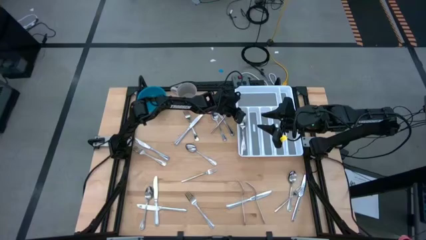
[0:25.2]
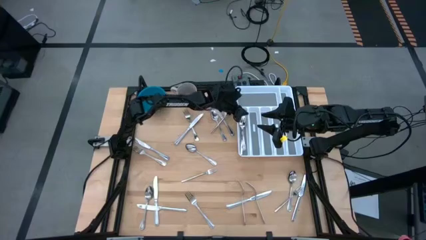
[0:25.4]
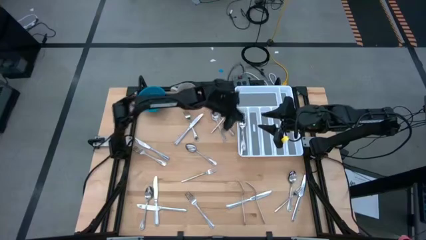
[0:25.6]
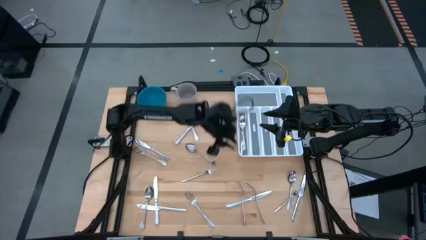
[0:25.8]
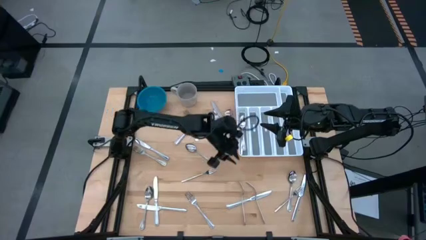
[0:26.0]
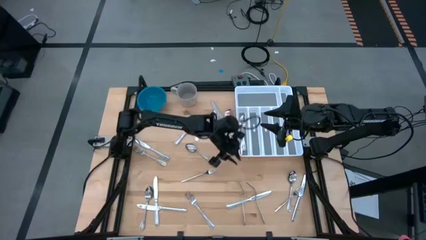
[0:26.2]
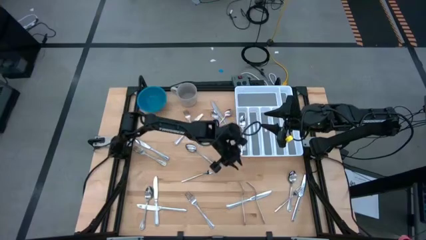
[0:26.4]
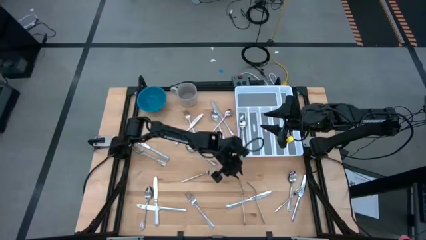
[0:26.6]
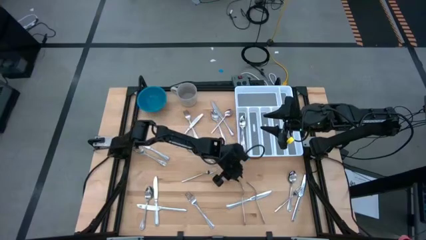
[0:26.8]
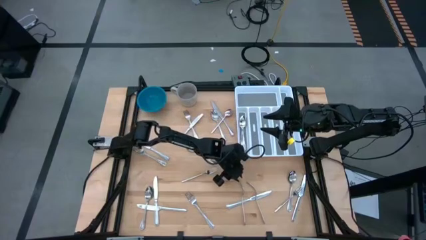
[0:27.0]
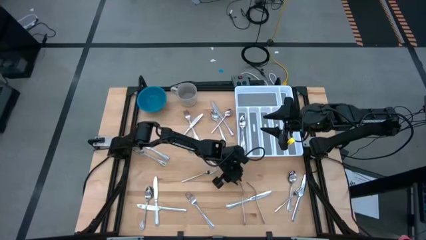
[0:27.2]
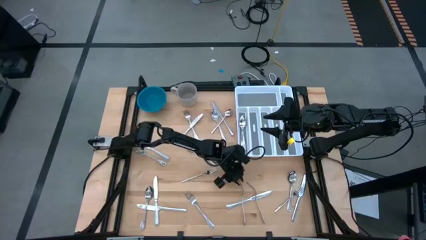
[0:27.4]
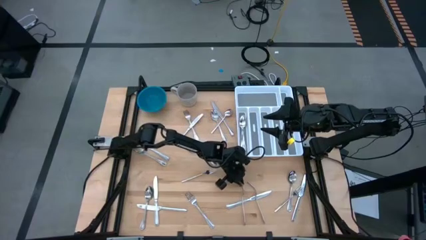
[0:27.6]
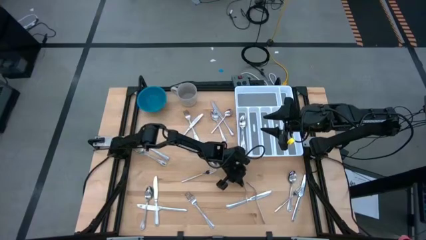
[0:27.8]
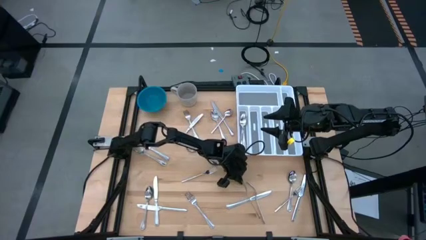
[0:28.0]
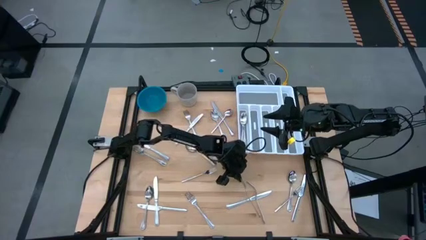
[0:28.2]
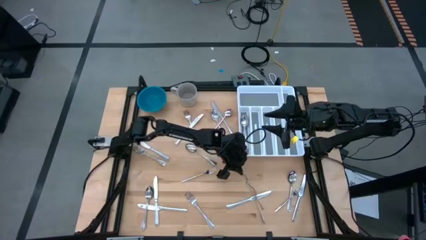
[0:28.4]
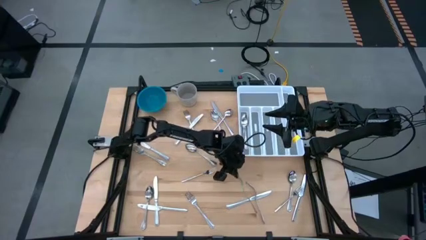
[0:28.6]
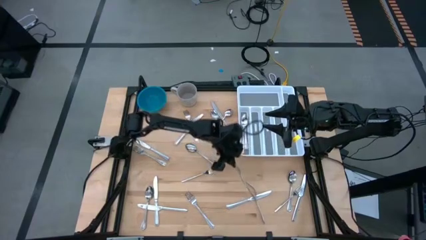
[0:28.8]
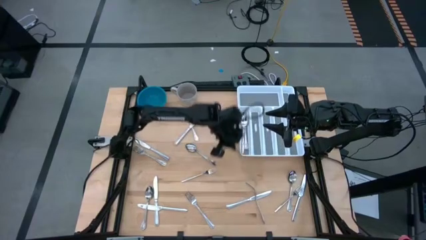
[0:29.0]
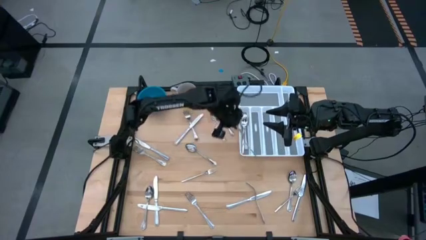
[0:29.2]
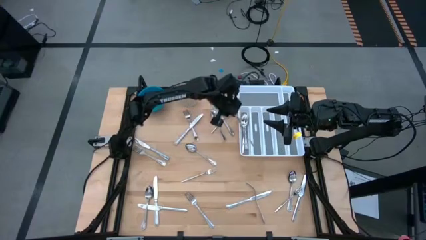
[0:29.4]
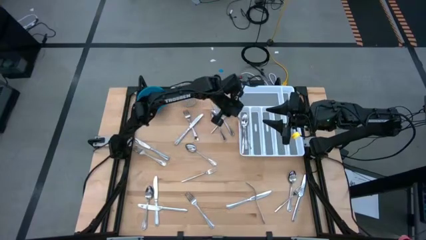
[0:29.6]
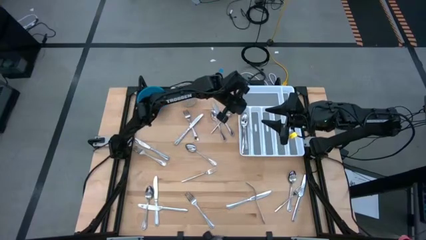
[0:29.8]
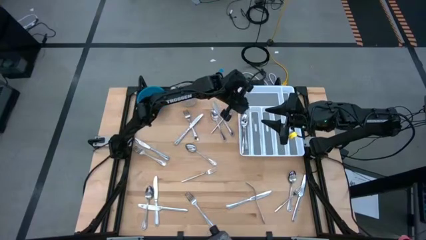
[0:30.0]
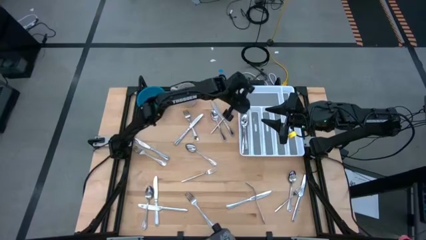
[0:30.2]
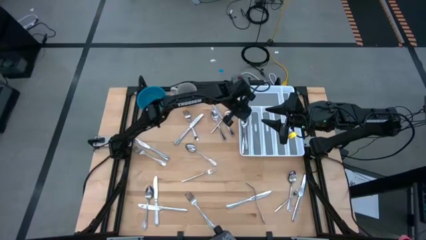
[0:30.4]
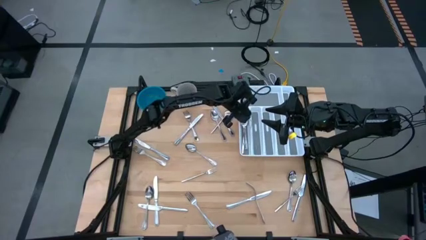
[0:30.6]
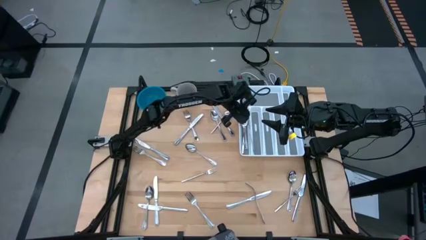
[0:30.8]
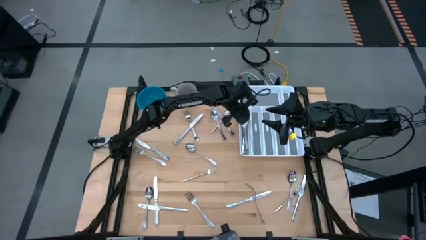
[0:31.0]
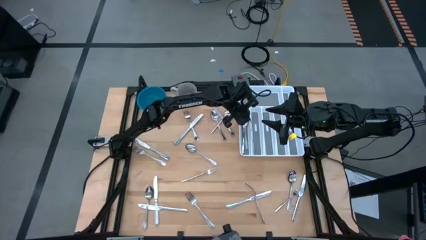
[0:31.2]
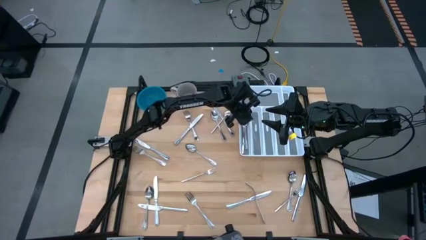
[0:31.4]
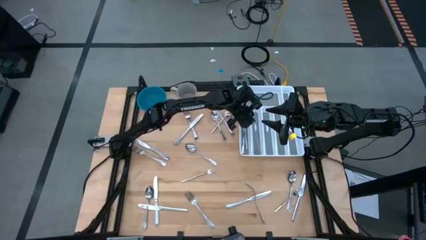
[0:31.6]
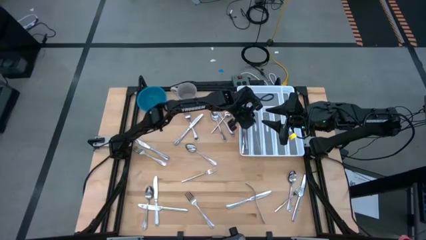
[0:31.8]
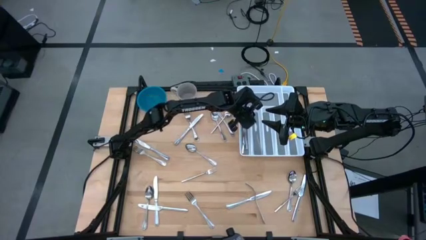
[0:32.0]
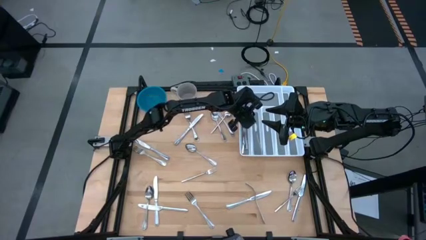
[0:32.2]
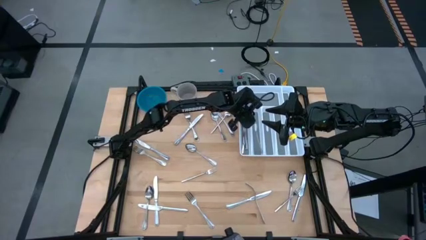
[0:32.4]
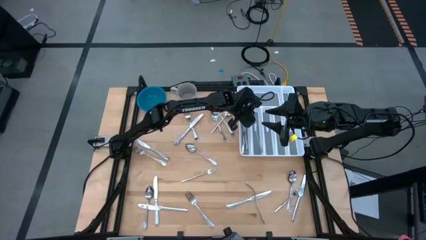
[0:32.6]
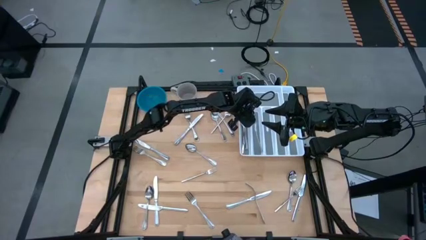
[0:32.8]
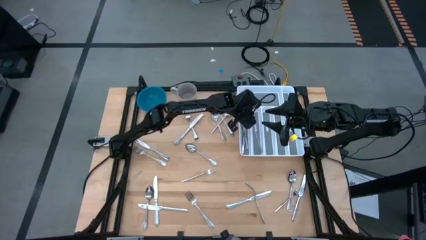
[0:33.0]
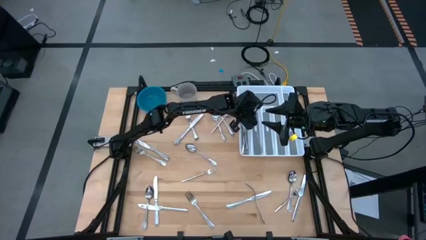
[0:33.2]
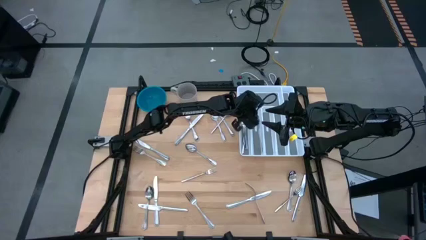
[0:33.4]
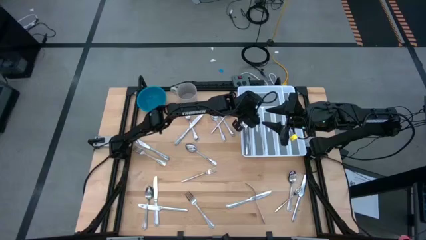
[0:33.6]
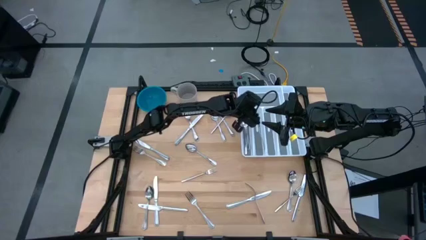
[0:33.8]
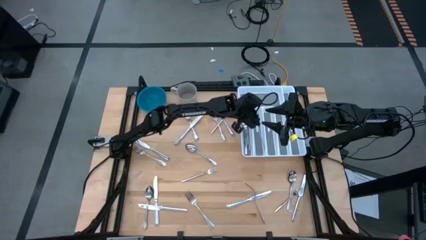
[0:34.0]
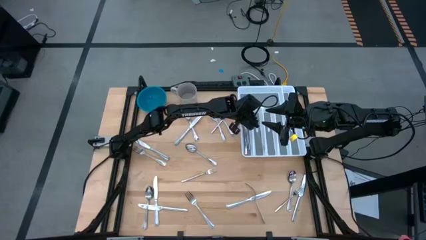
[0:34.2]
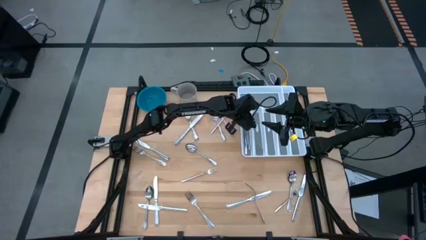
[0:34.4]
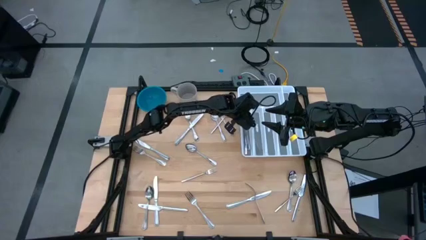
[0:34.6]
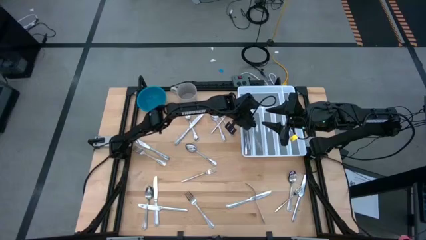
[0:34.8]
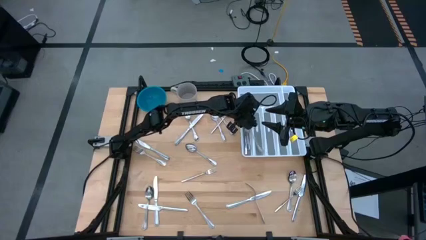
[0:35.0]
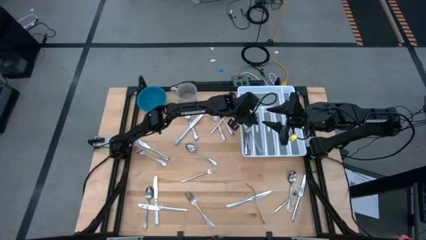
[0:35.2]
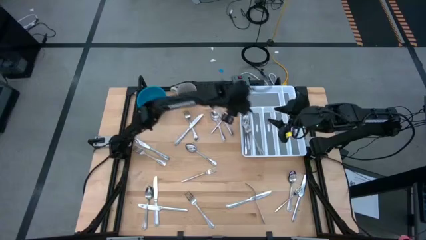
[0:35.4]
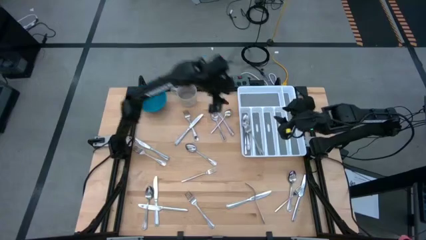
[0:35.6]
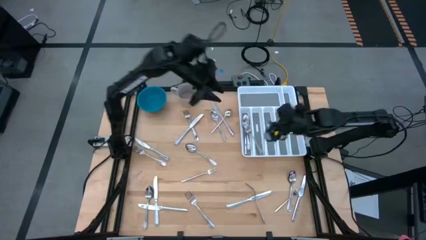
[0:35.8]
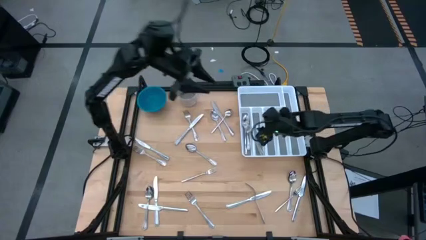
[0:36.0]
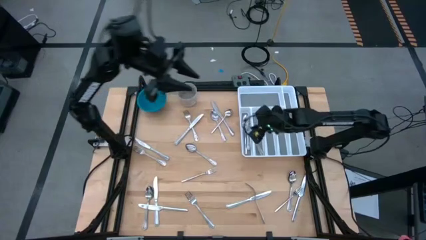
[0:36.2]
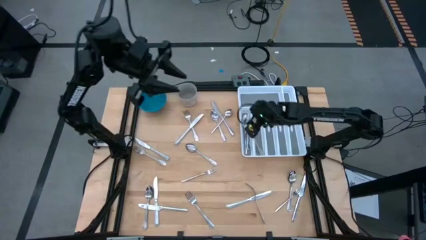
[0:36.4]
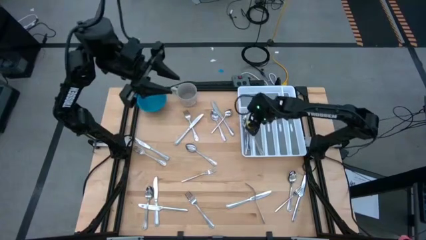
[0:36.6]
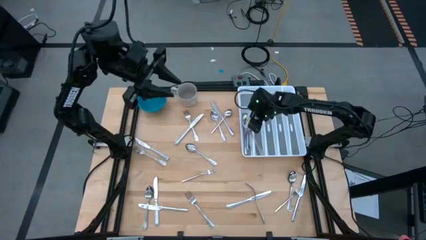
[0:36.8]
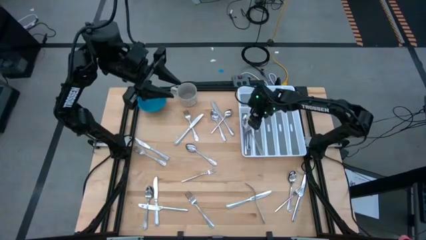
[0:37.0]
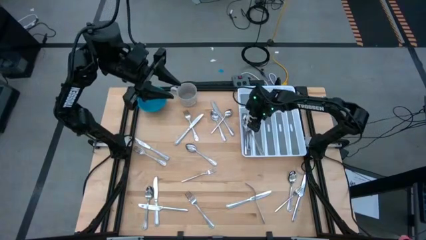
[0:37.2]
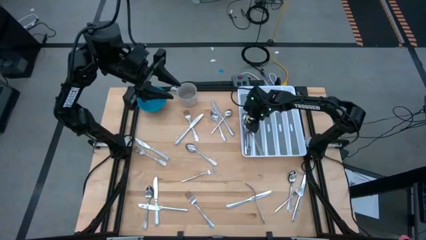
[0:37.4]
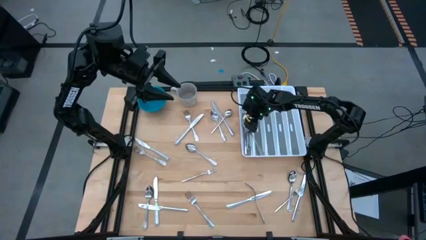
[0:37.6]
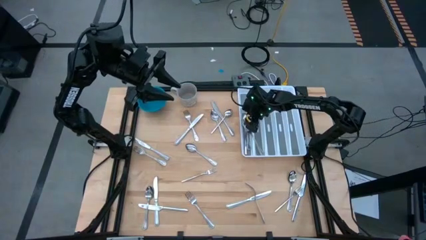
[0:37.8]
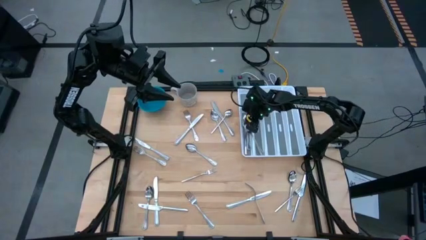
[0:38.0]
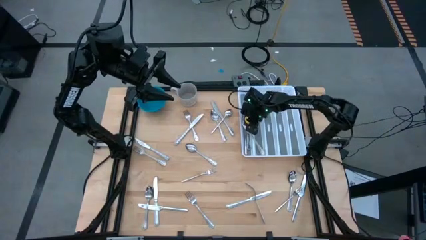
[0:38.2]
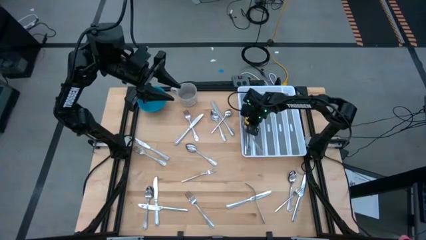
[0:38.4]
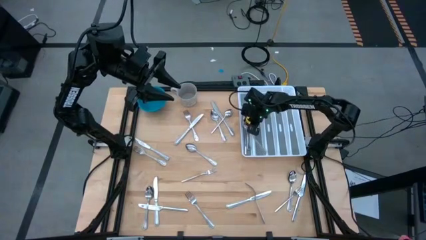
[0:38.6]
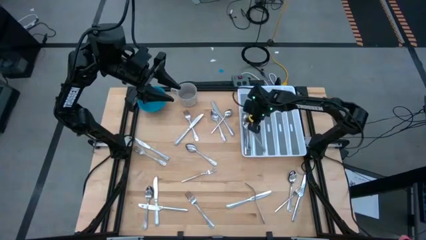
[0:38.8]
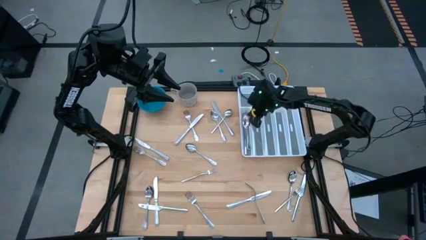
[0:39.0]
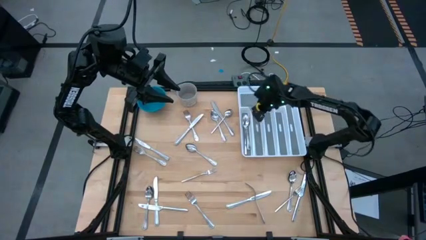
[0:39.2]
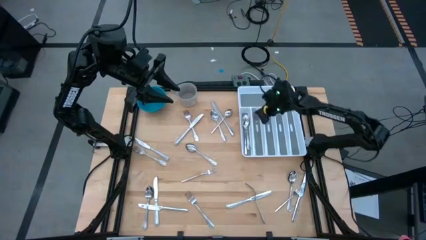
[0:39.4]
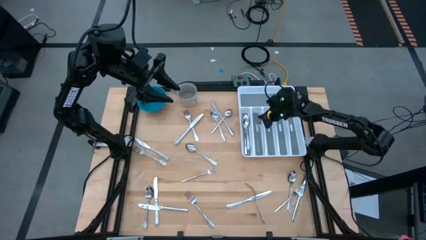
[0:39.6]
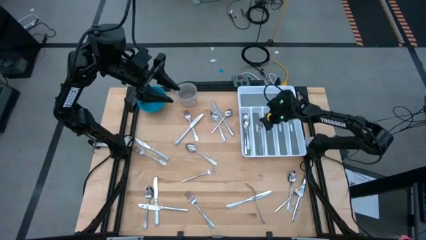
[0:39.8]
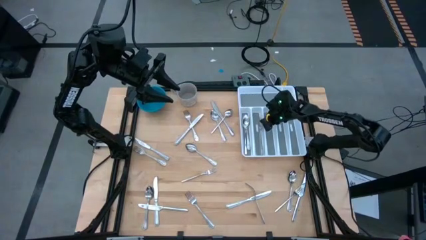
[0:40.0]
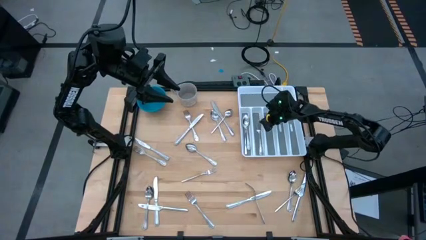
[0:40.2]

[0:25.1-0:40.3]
Task: Sort silverware
Put the fork in the silverware tray
